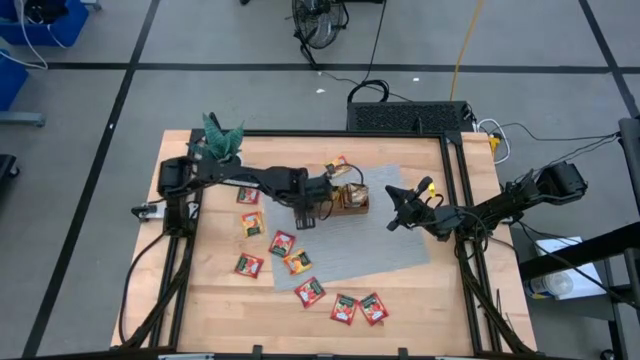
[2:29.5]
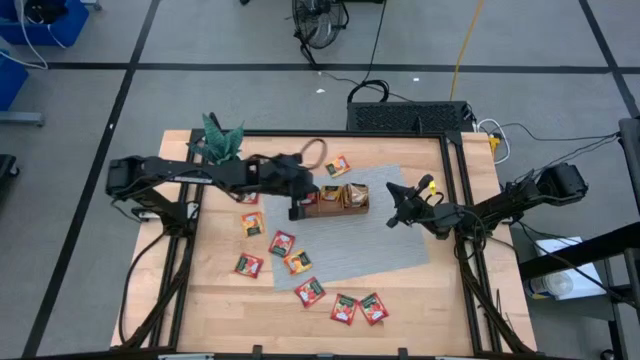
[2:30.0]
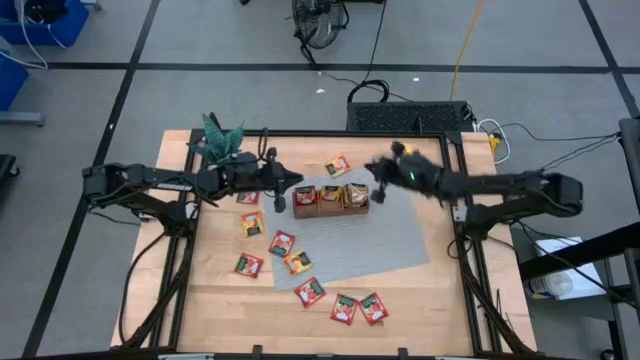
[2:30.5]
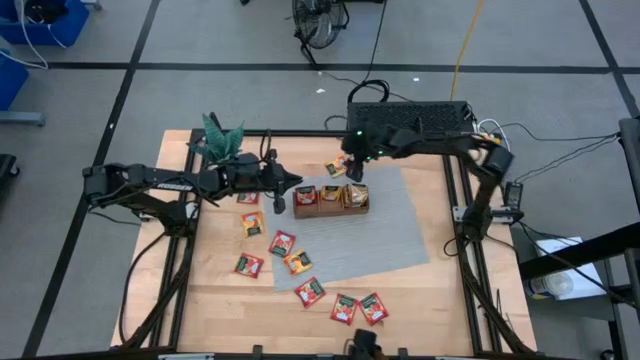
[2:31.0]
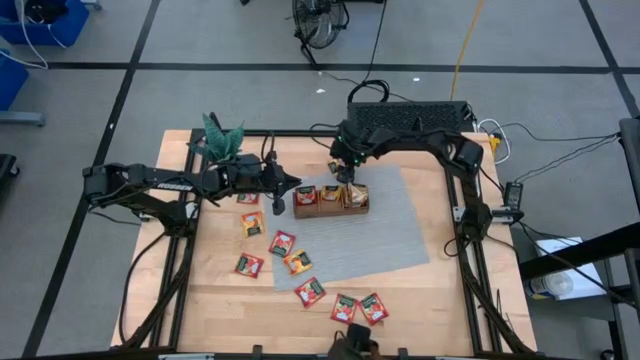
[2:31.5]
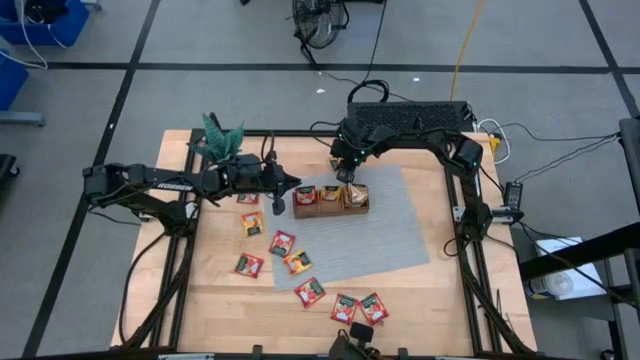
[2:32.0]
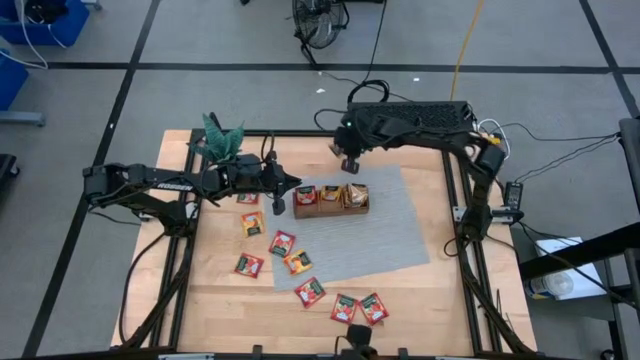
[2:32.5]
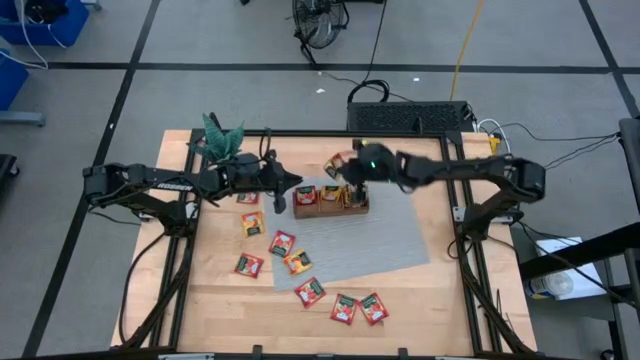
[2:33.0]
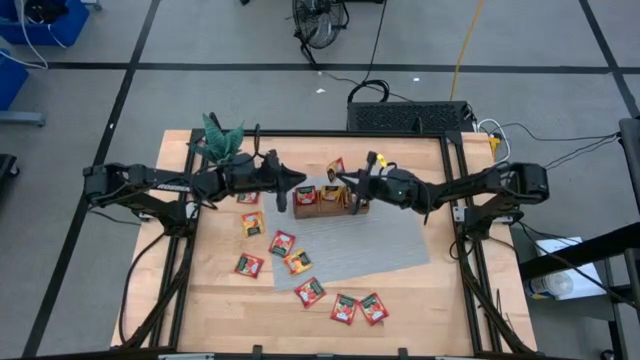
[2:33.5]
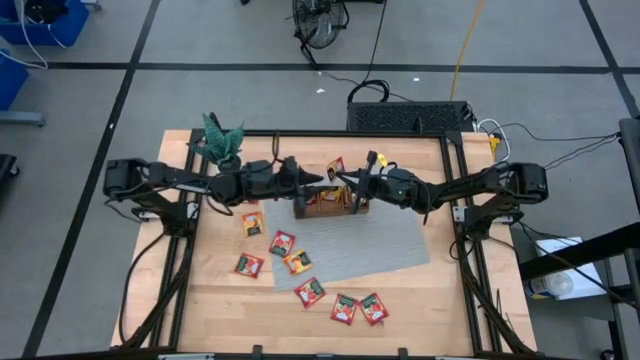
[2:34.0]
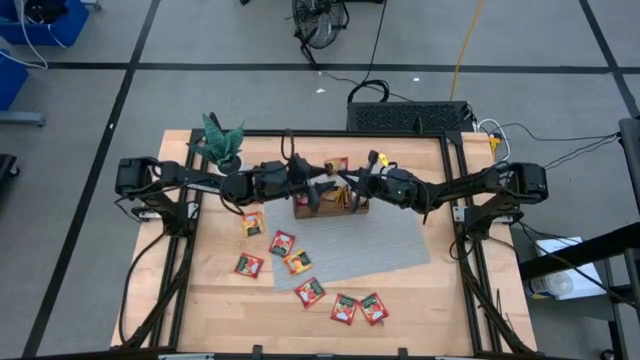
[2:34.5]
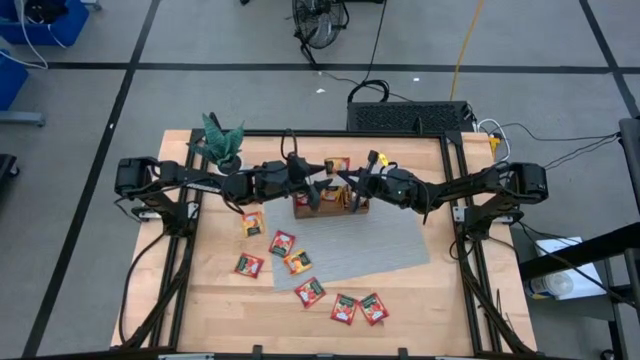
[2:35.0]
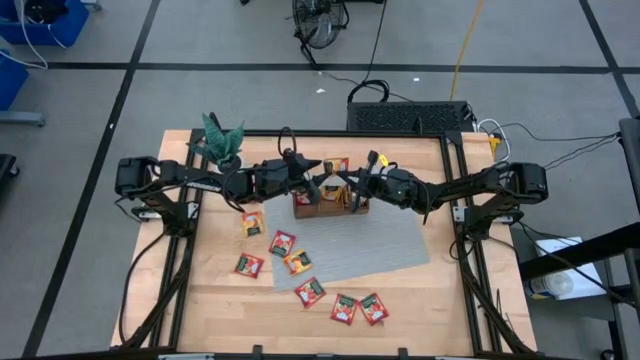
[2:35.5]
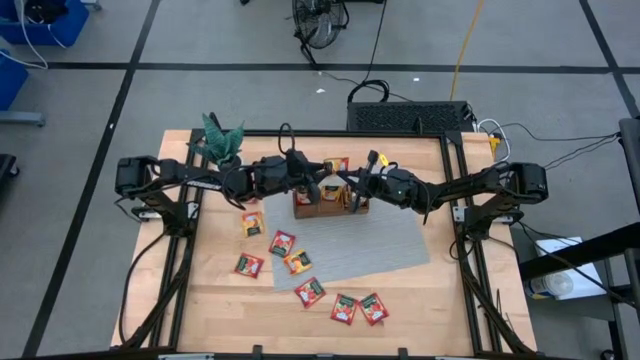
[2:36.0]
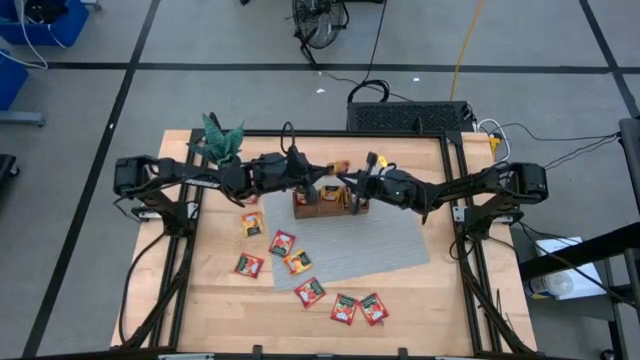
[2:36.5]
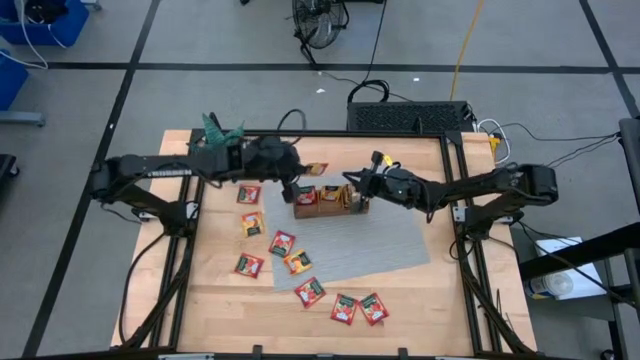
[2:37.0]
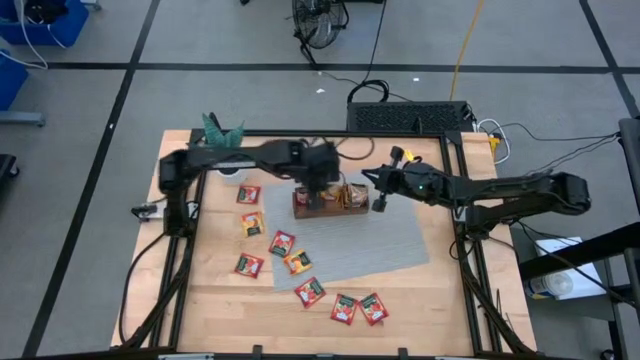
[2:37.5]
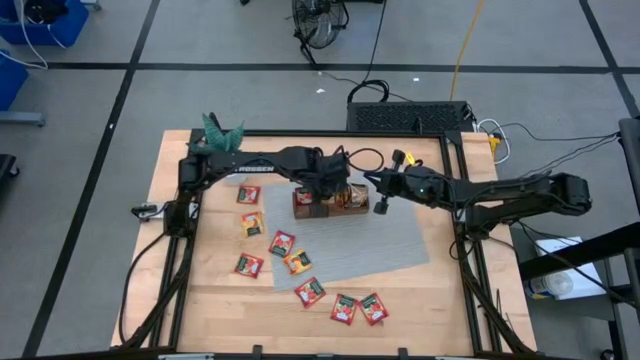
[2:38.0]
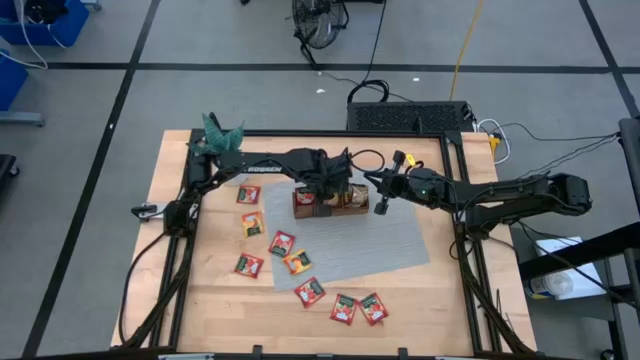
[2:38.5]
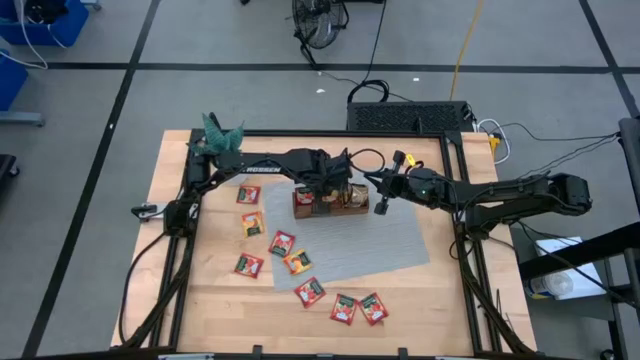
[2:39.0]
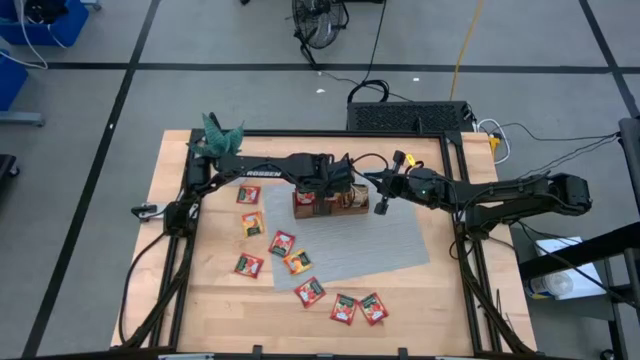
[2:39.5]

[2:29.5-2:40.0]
Task: Pick & Place Tea
Put the top right yellow tea into the middle part of the wooden organizer

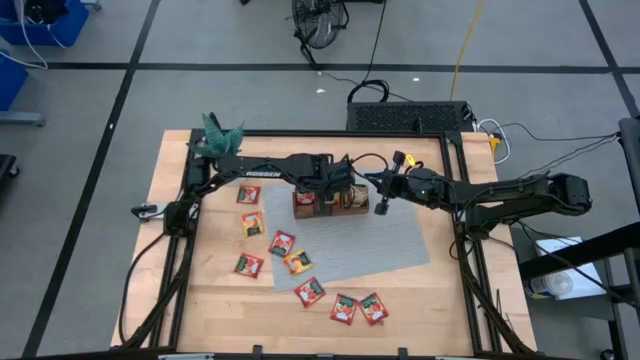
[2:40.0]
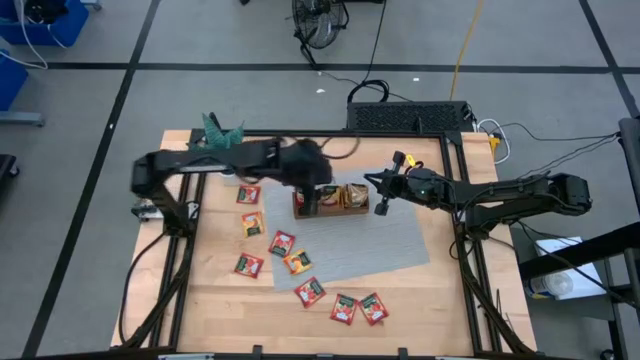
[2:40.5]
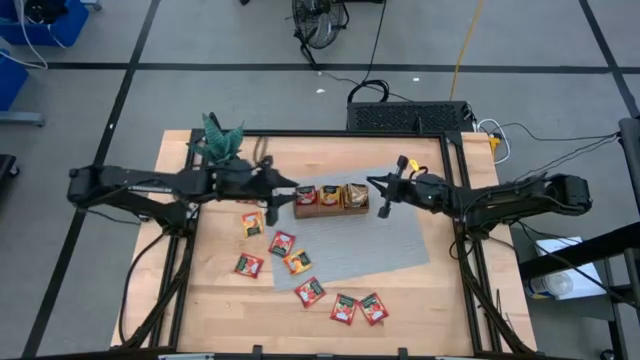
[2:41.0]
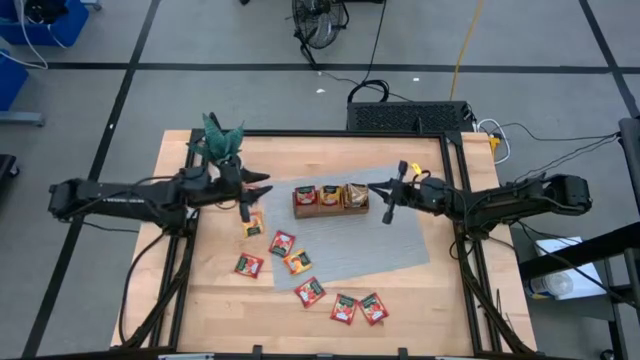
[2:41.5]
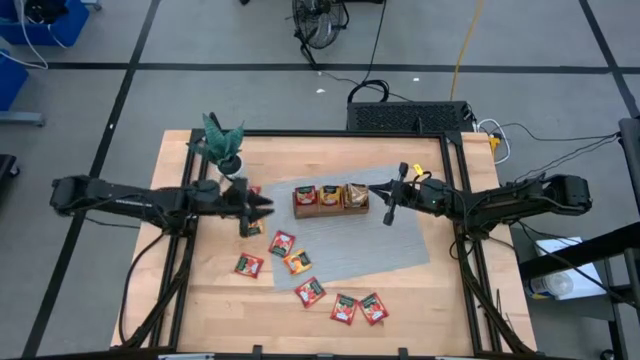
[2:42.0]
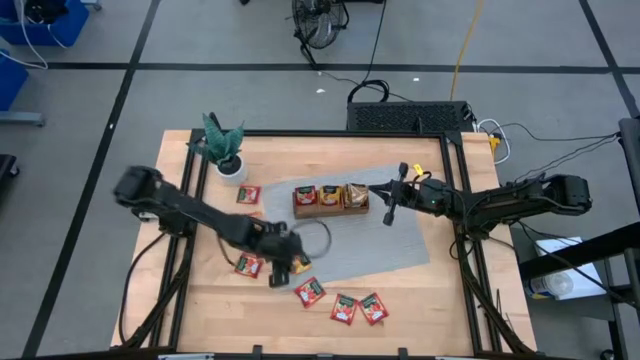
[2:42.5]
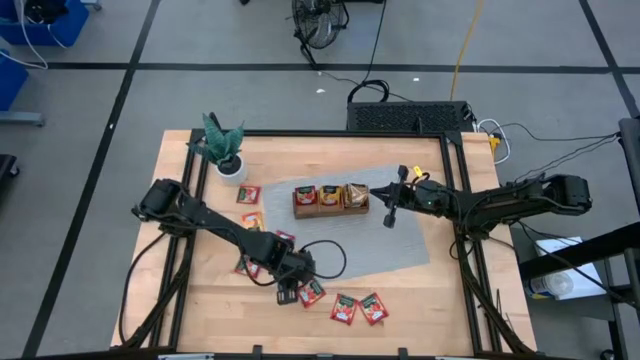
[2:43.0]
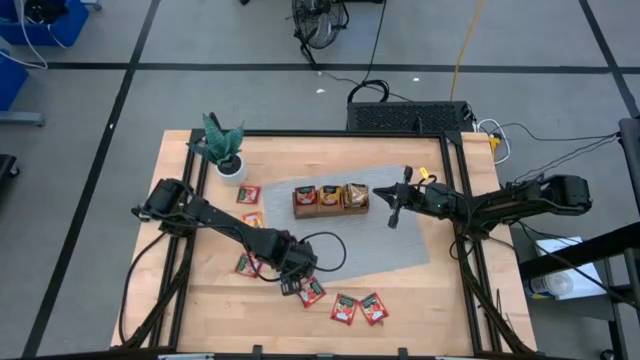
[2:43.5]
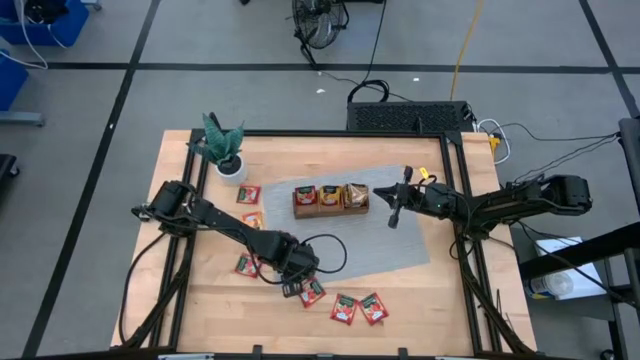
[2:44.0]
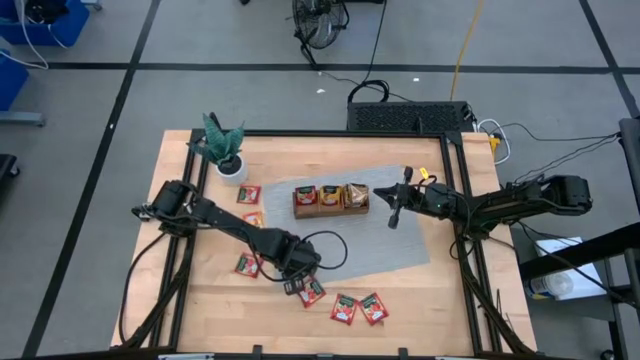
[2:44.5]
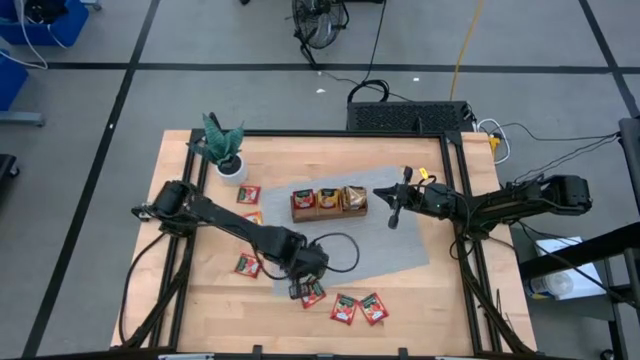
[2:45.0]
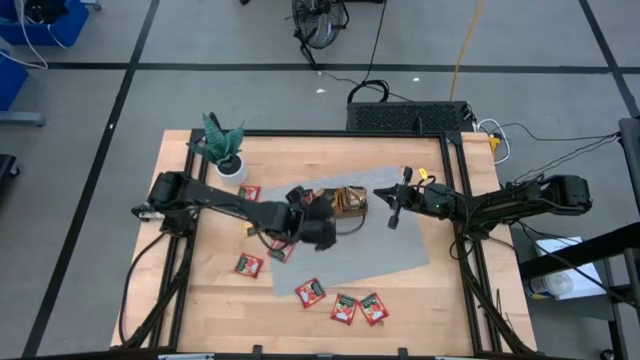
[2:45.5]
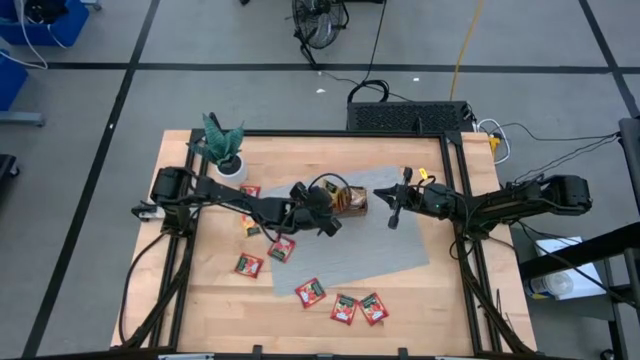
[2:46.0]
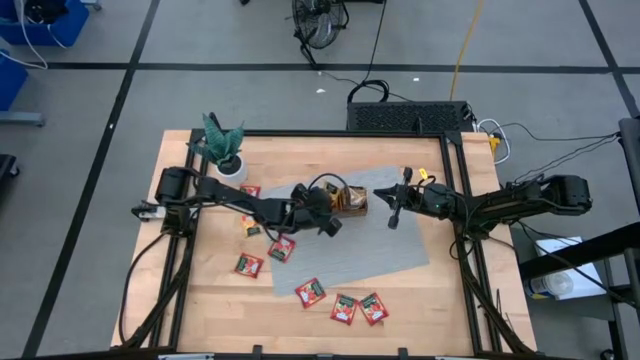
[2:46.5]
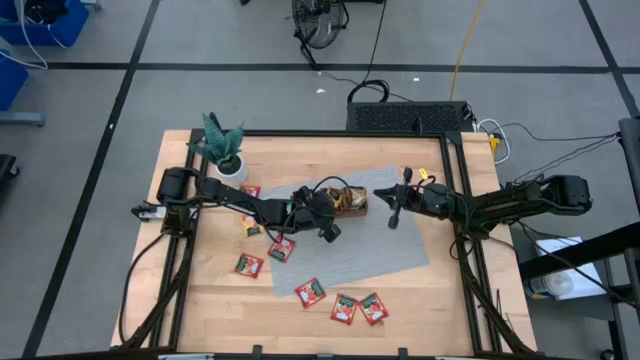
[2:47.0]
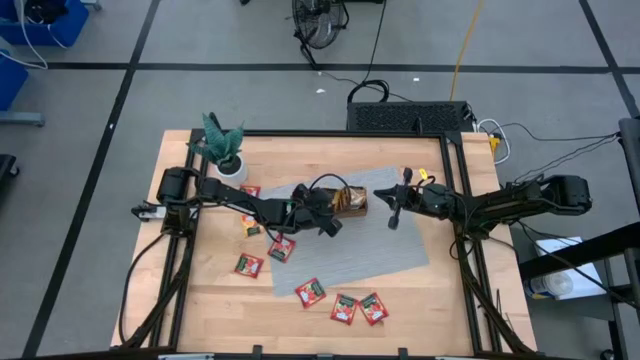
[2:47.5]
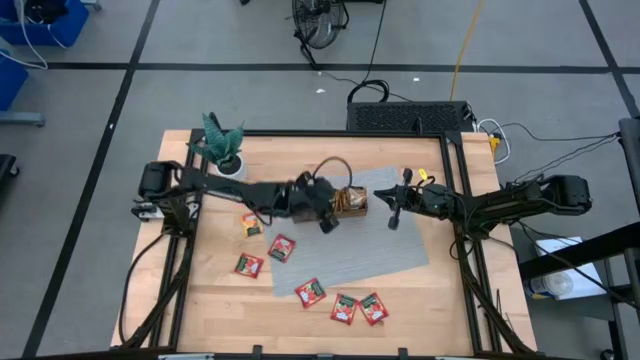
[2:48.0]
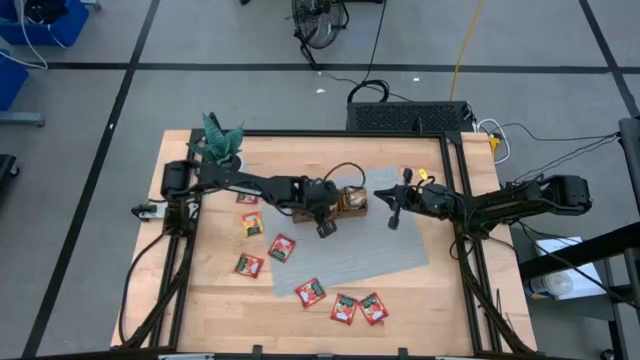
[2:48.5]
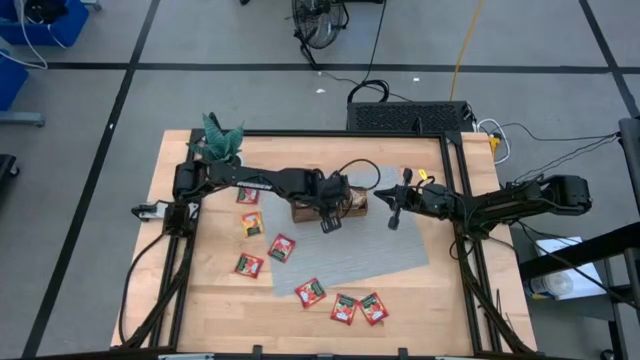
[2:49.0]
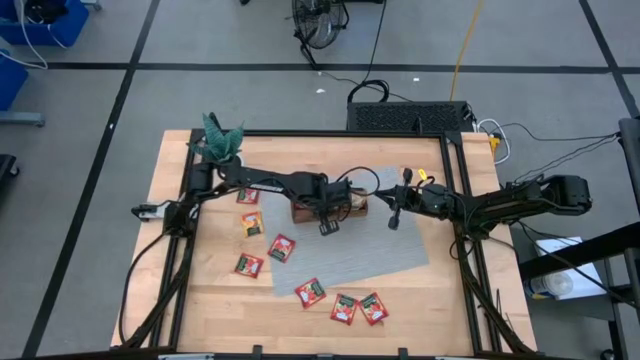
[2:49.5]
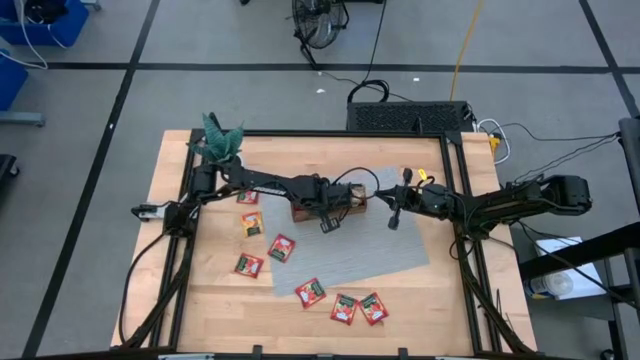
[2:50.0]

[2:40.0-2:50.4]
Put the bottom yellow tea into the middle part of the wooden organizer
